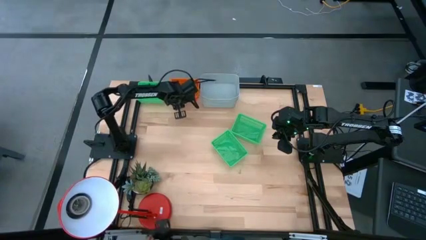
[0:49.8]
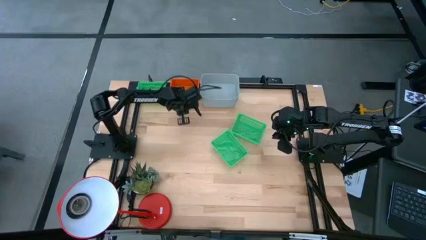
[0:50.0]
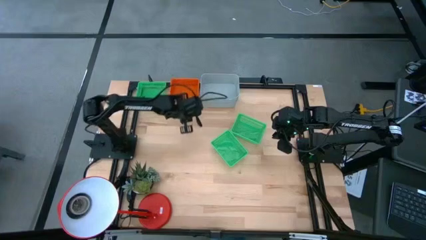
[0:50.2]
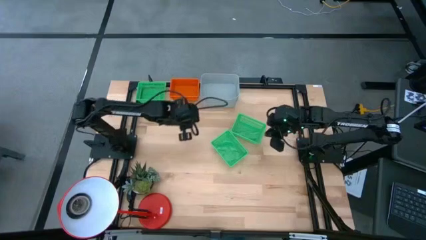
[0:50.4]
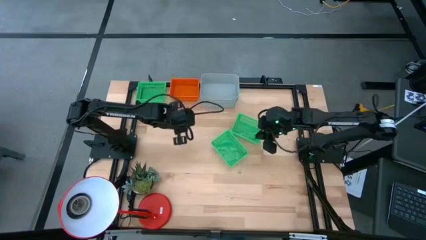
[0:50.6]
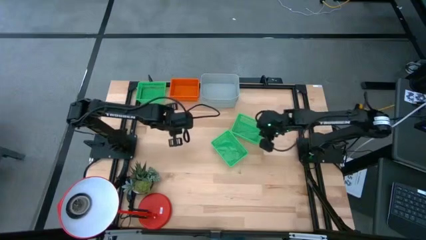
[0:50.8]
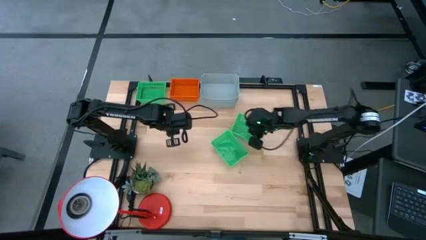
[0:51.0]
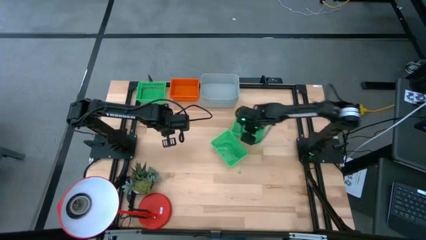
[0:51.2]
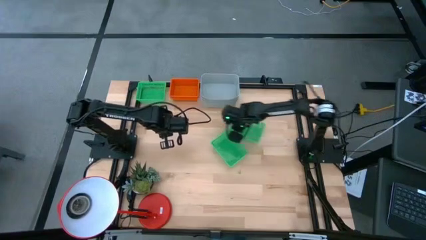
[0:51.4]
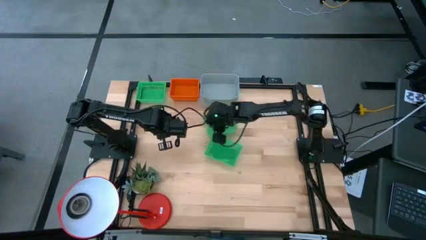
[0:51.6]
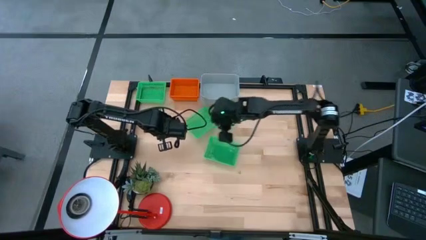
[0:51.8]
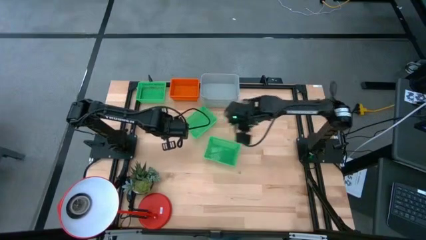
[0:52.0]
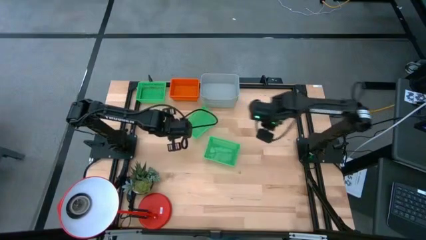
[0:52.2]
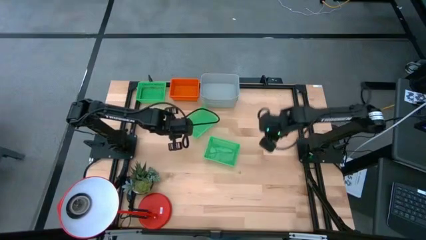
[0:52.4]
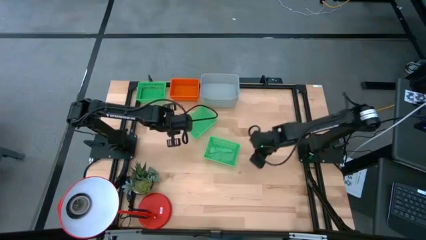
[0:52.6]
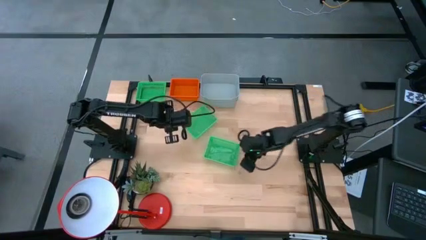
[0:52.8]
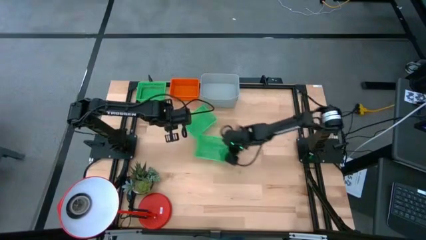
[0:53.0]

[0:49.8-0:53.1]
Move the green bins to the center of the table

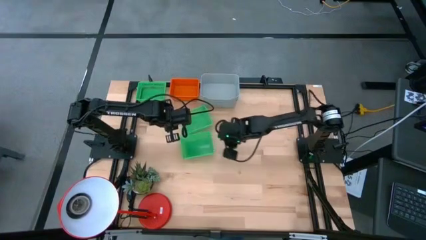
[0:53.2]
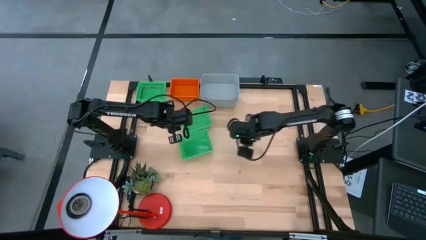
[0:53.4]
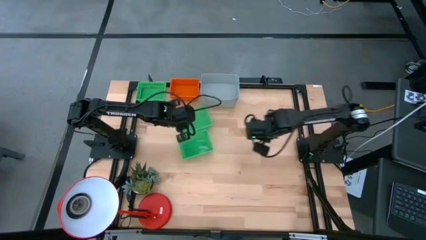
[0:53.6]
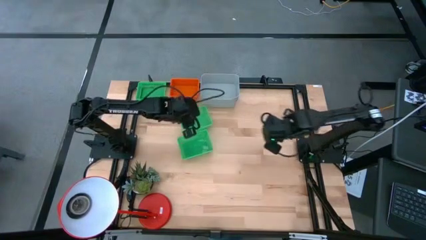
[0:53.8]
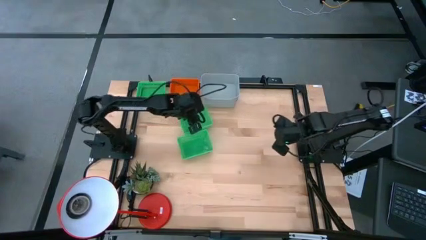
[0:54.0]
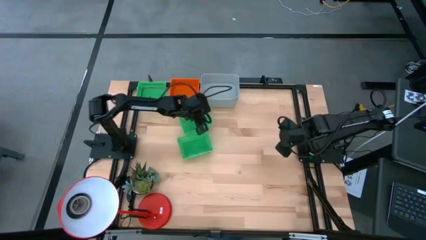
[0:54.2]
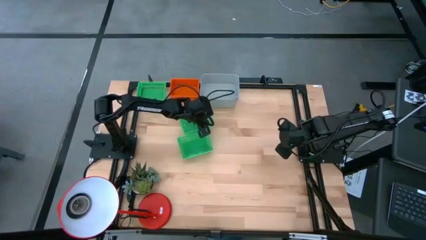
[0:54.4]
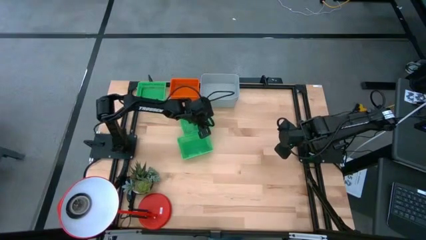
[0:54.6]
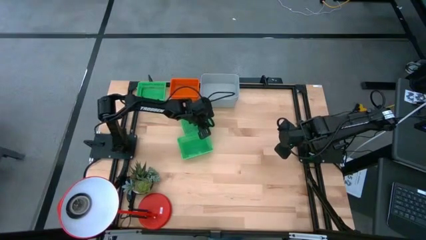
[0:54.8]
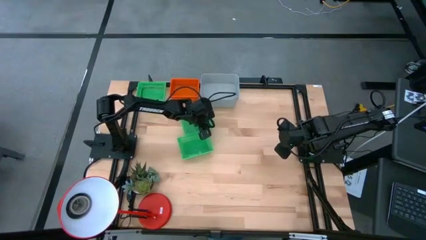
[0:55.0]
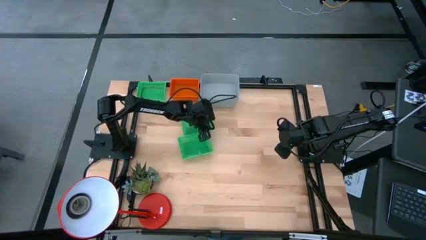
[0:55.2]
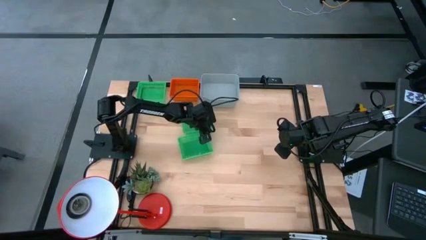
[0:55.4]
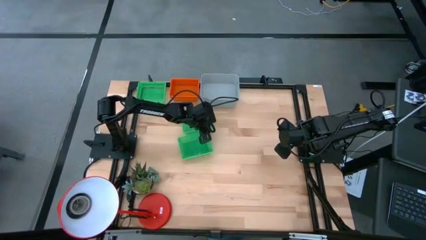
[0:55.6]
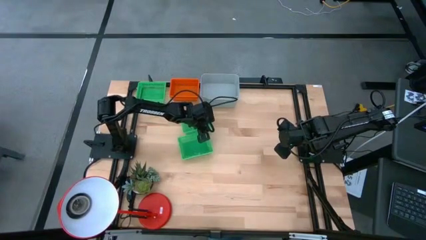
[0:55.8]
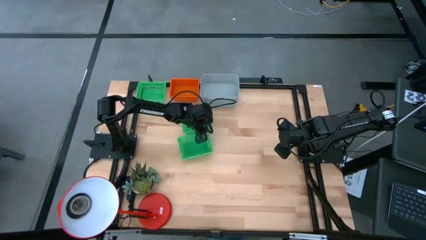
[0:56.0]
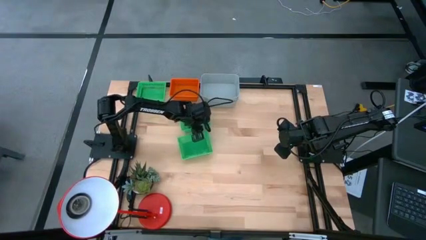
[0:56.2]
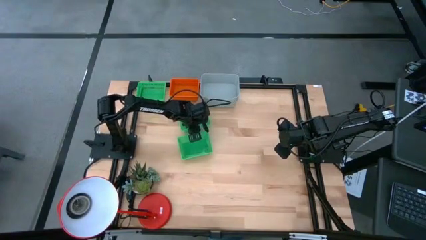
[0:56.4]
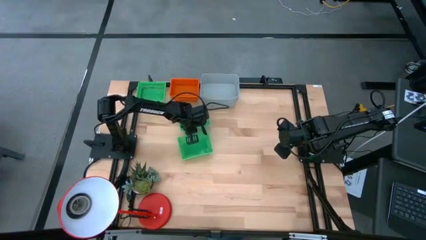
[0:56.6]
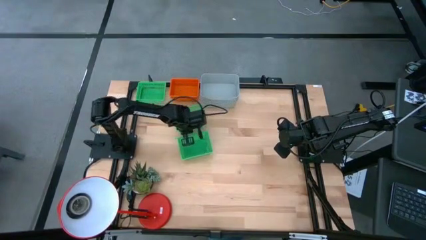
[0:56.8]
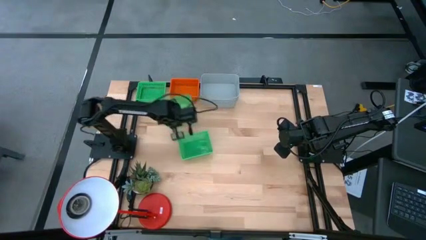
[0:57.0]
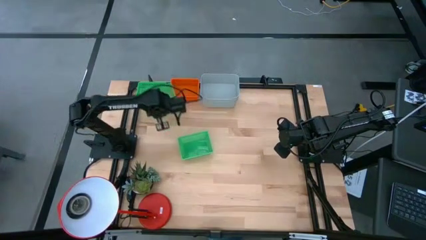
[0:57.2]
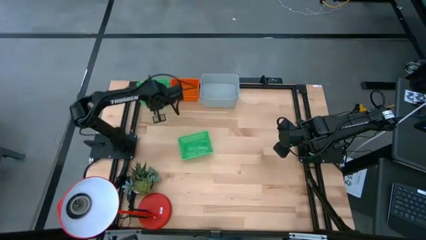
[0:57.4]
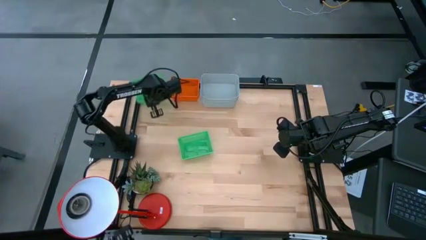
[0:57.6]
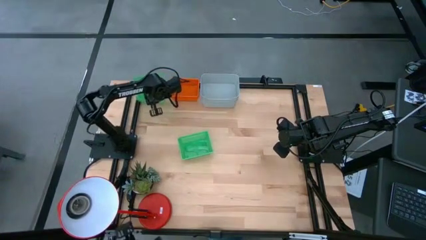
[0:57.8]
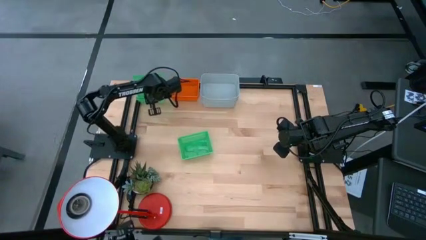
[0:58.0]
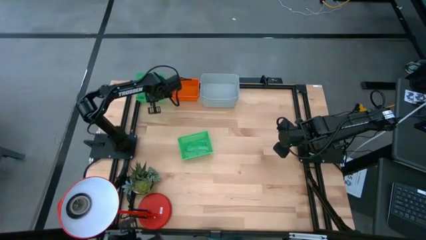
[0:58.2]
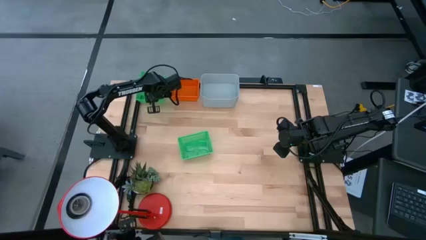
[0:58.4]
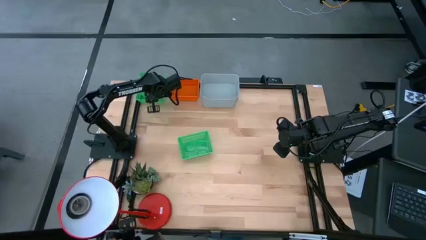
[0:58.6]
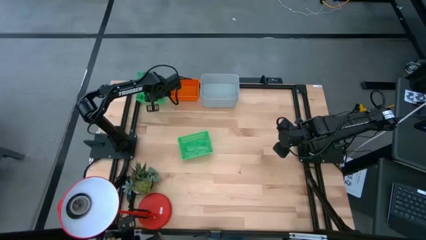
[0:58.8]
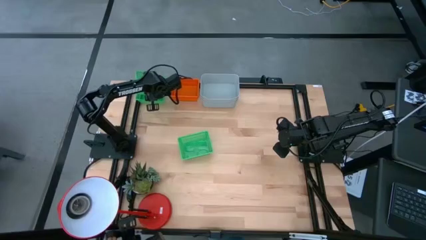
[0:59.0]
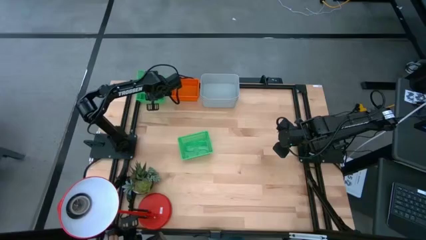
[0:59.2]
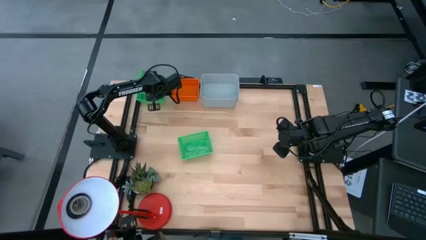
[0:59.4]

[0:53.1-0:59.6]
Stack the middle green bin on the top green bin

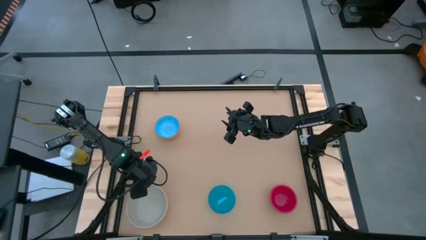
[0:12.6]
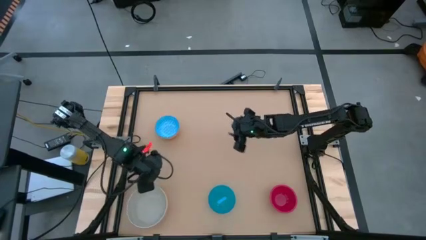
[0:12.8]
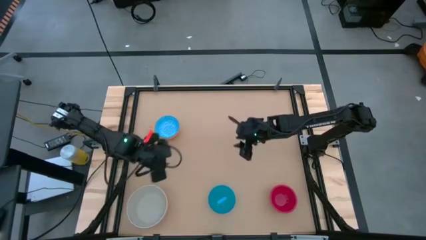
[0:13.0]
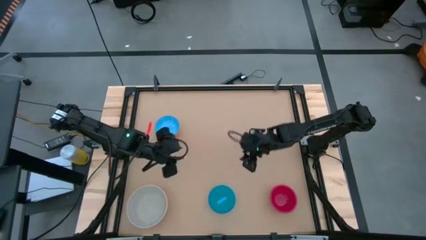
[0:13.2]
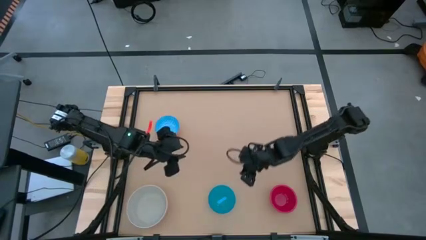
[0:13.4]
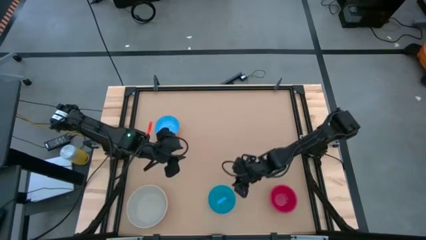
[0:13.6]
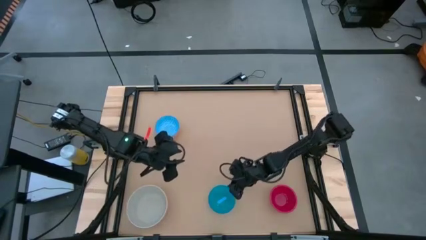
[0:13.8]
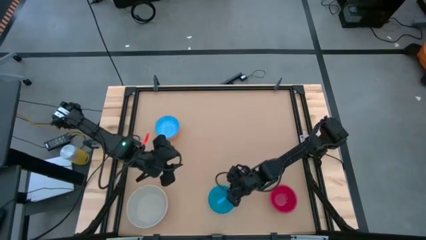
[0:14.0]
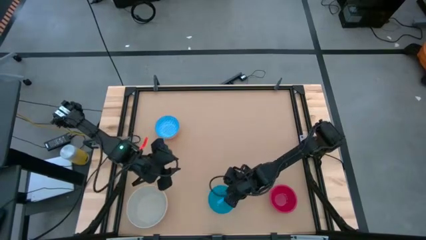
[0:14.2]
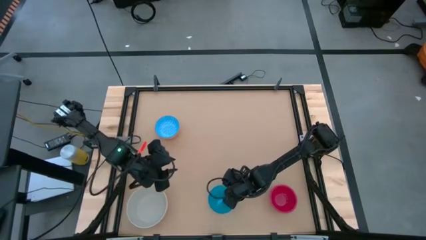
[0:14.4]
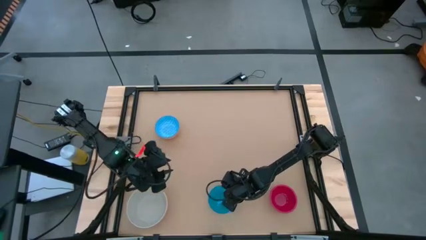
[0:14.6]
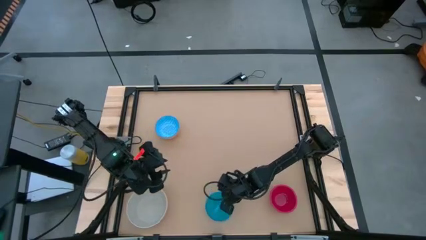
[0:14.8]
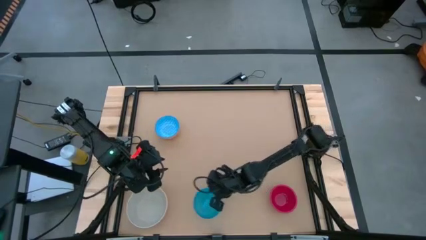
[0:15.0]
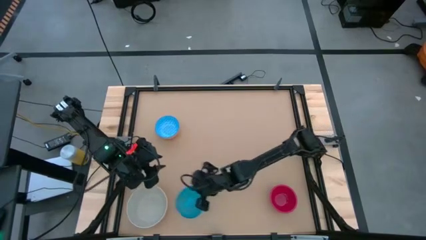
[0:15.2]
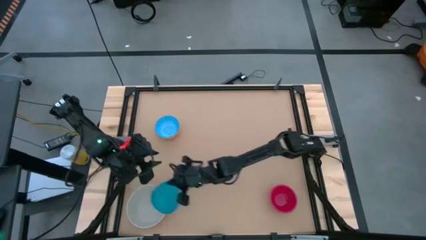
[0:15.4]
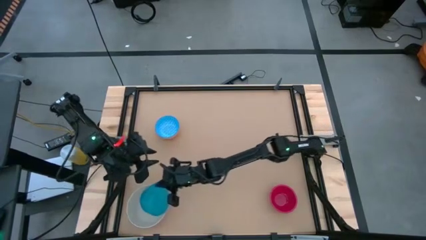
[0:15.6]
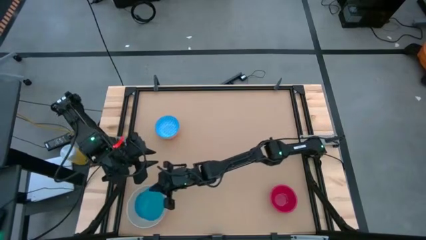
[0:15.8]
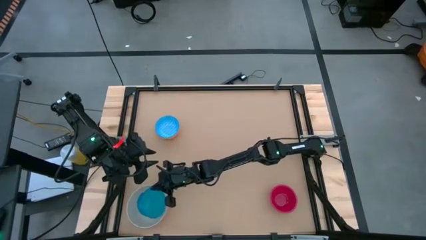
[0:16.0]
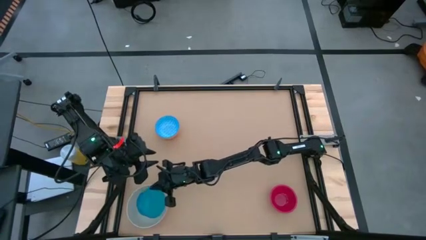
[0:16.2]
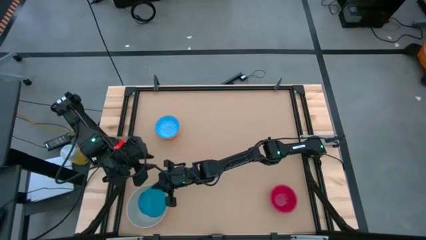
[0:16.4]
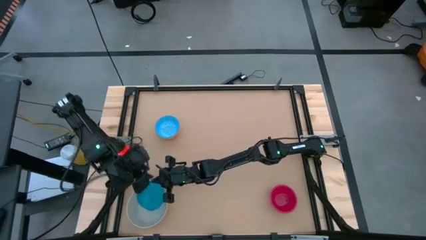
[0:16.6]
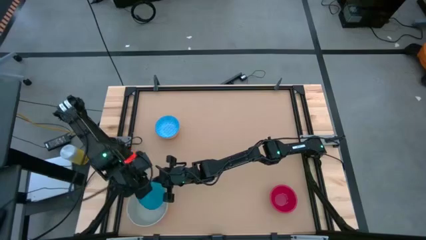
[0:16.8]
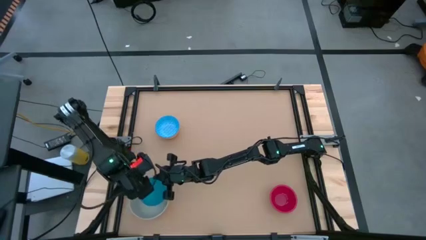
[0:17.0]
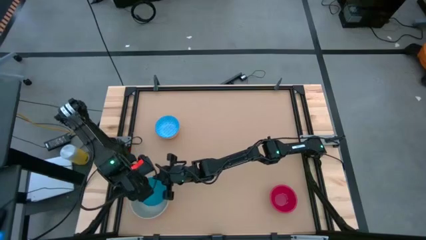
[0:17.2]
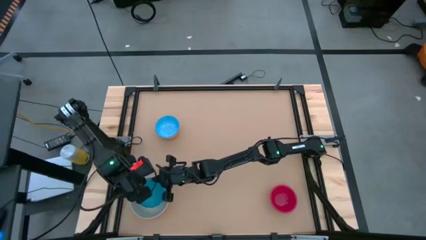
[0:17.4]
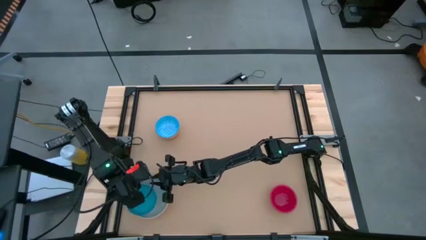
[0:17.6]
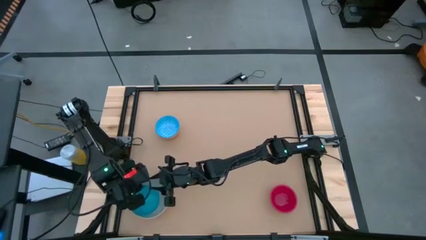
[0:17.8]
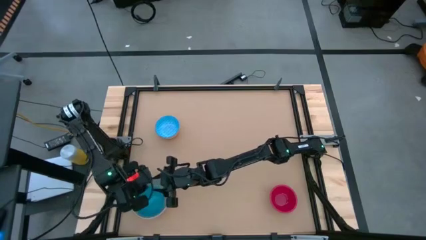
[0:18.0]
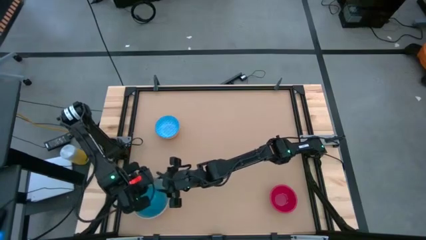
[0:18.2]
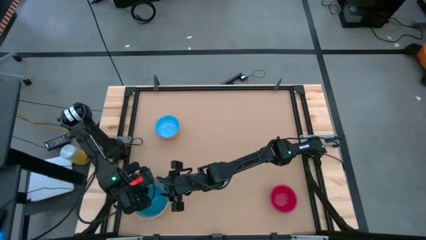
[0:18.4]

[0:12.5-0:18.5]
Stack the blue bowl on top of the gray bowl
